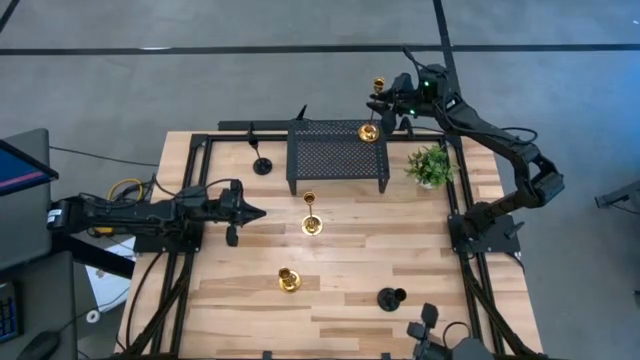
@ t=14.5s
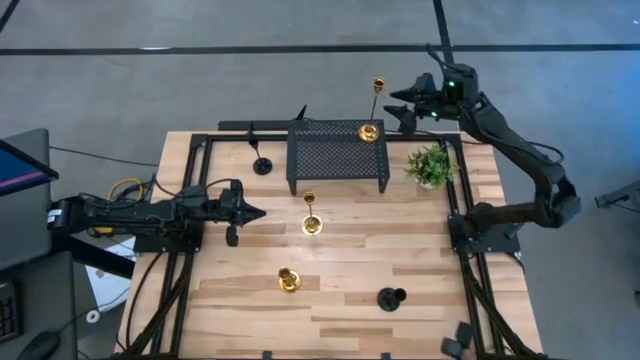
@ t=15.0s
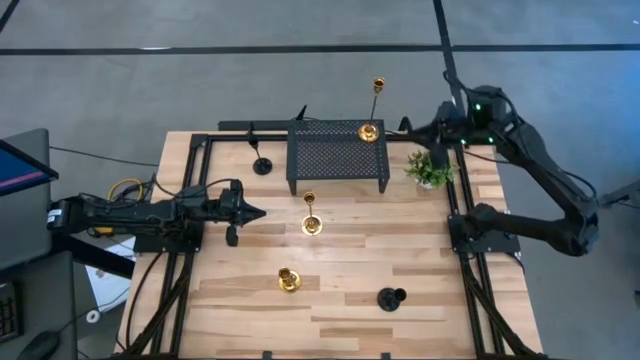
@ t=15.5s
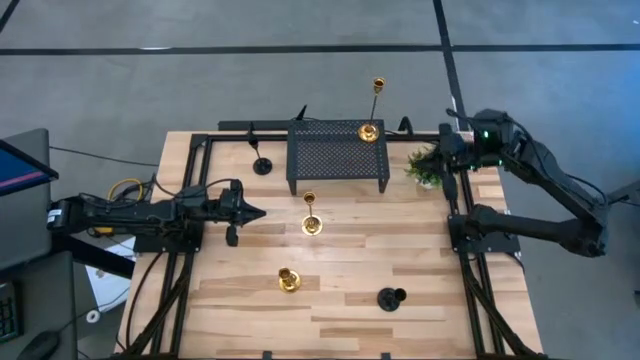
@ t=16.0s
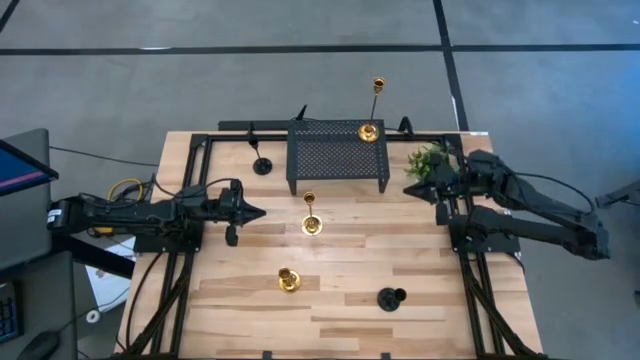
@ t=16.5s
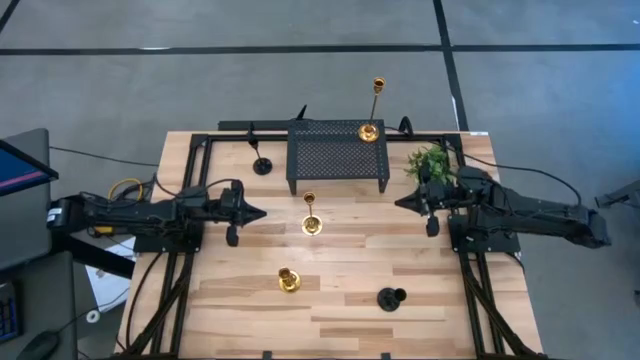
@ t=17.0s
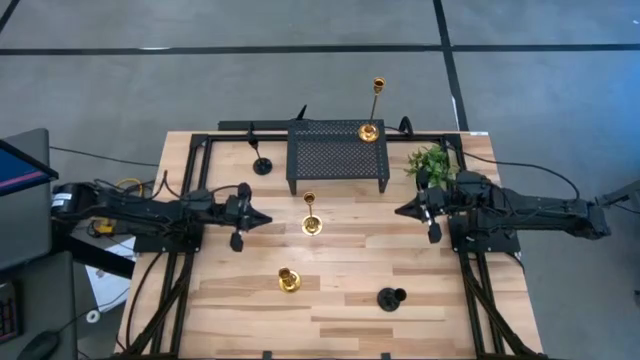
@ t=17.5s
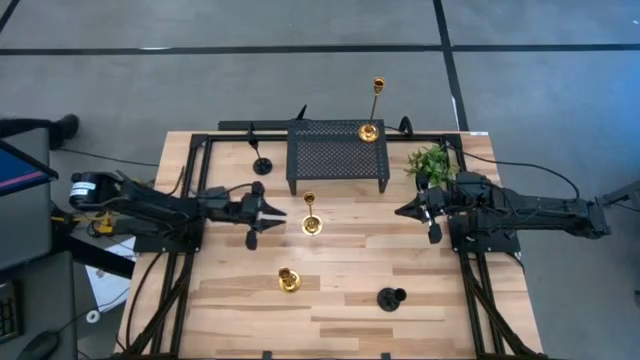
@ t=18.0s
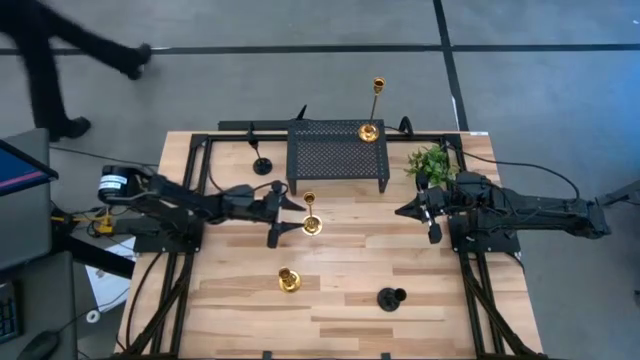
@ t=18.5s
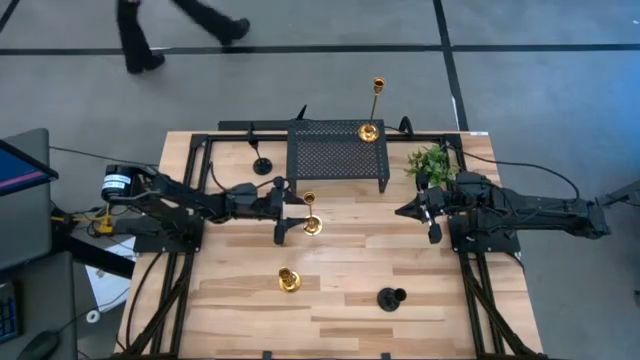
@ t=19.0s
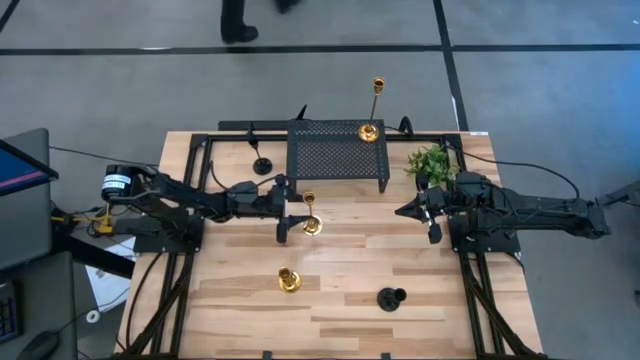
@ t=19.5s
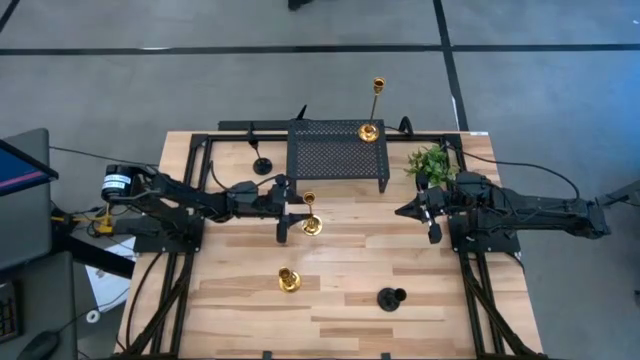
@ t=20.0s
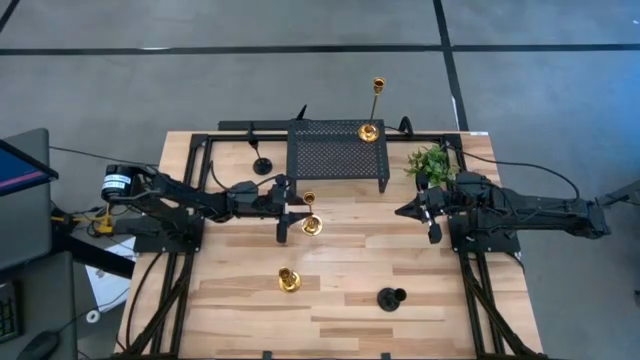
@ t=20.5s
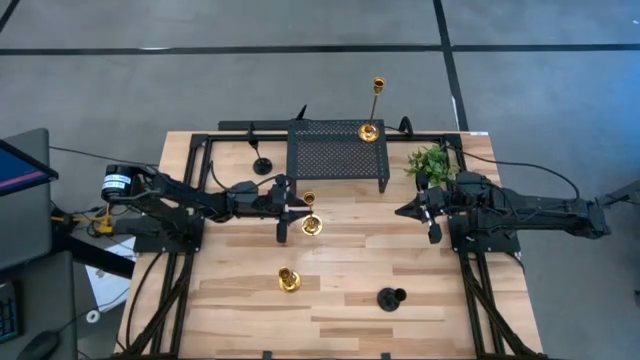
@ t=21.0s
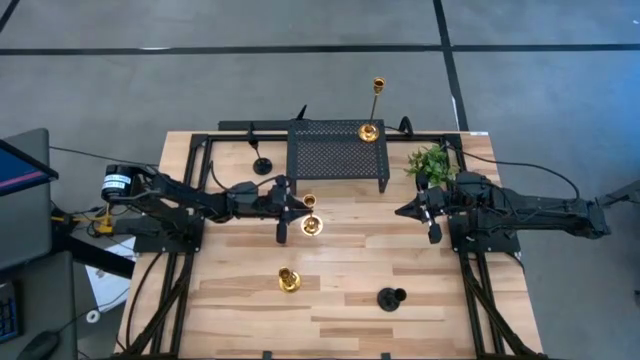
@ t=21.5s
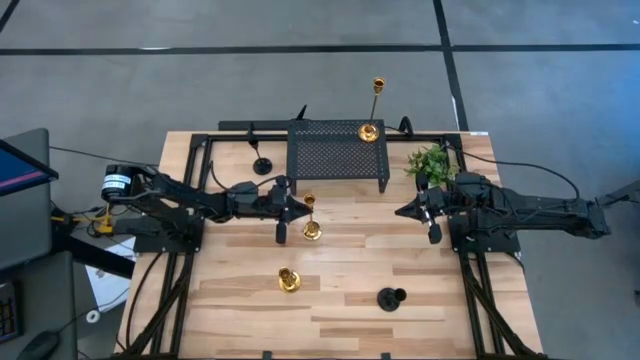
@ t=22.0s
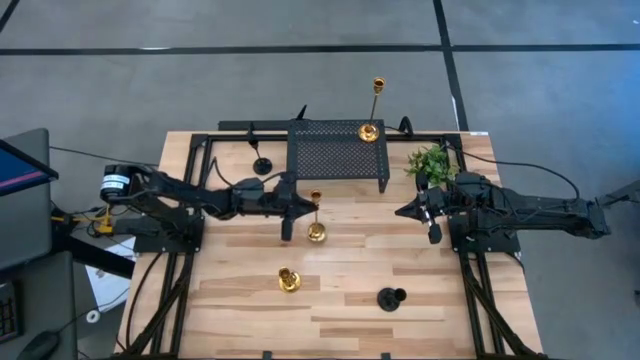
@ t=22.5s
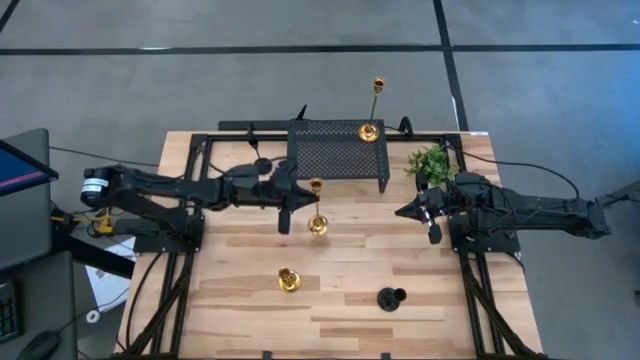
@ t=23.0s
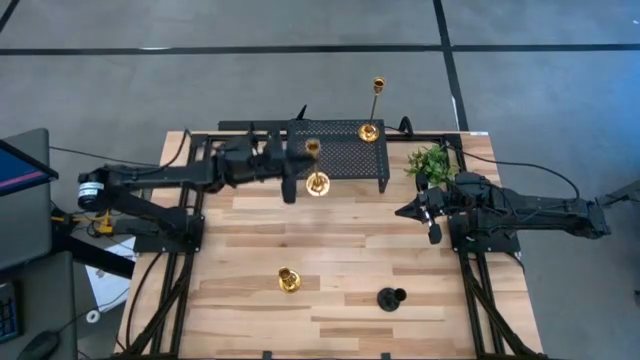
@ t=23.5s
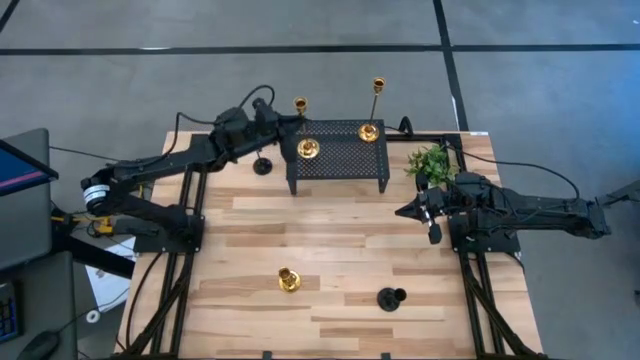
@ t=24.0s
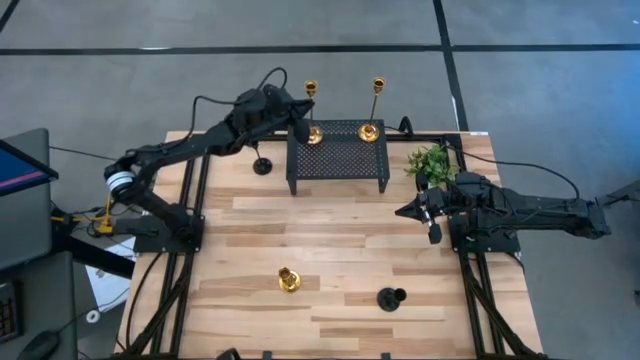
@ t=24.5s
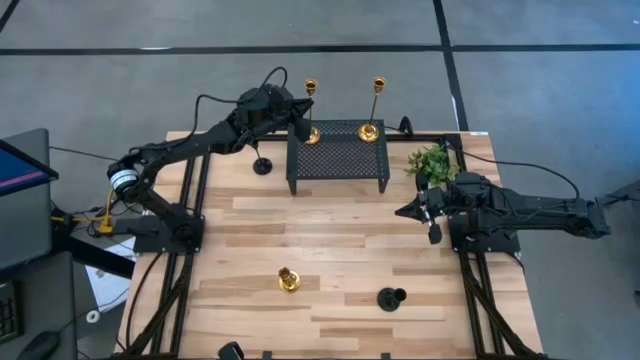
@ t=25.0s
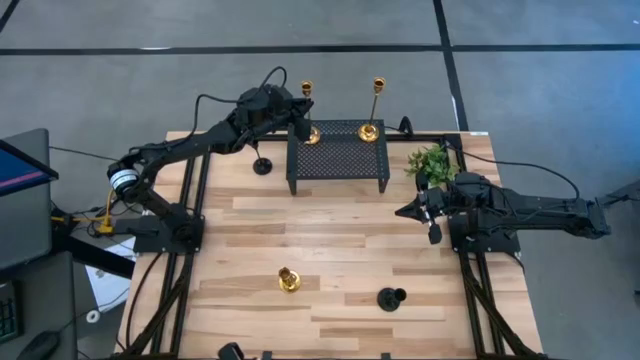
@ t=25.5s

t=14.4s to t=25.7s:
Task: Pick & Place candle stick holders
Put the top gold candle holder on the shelf

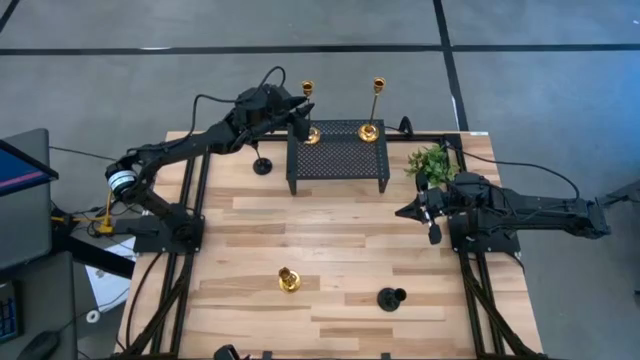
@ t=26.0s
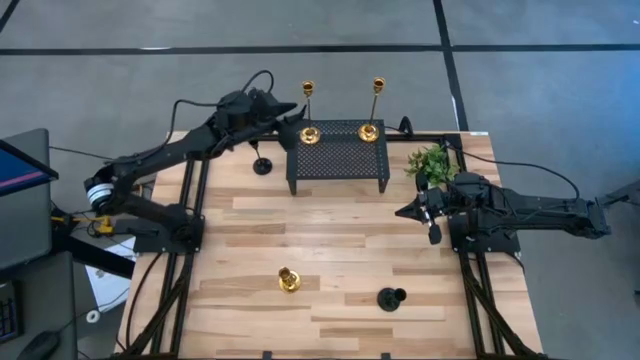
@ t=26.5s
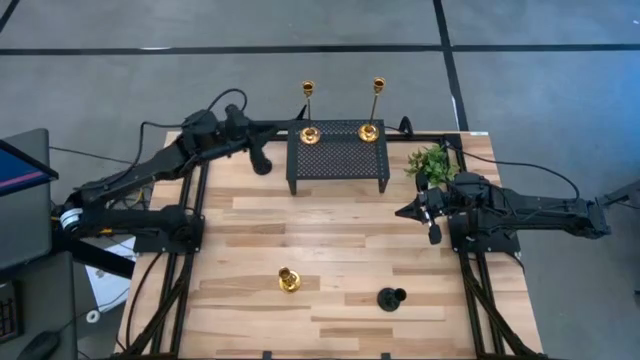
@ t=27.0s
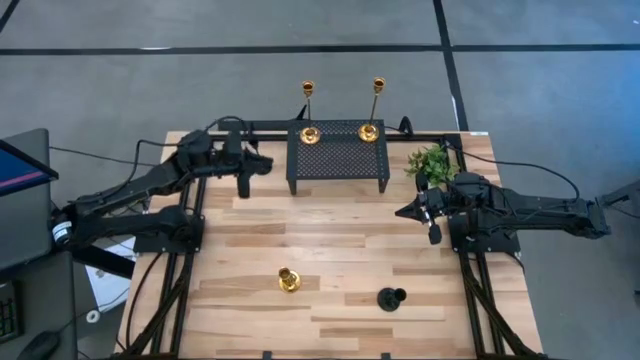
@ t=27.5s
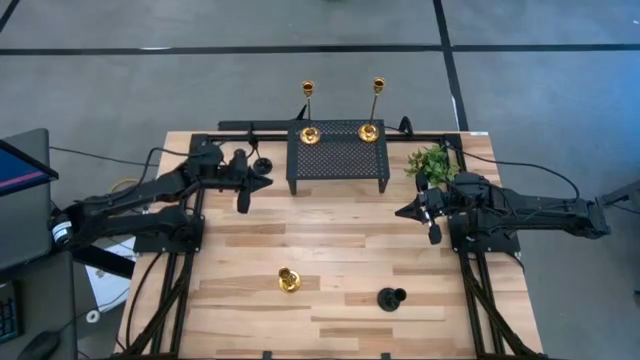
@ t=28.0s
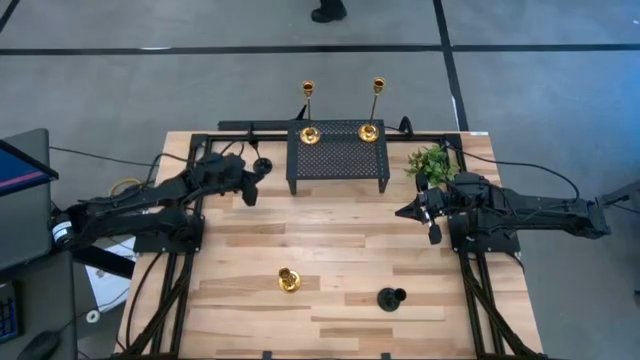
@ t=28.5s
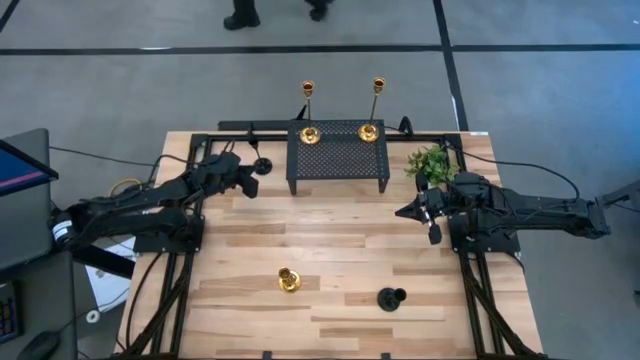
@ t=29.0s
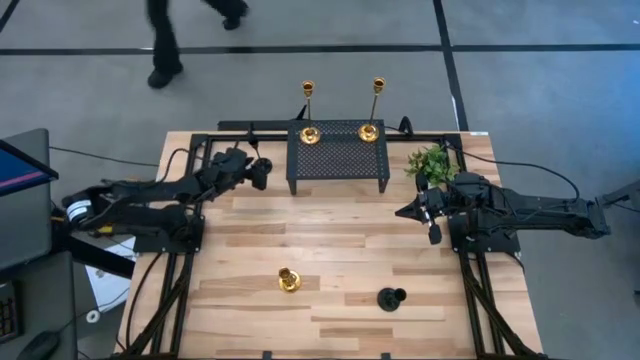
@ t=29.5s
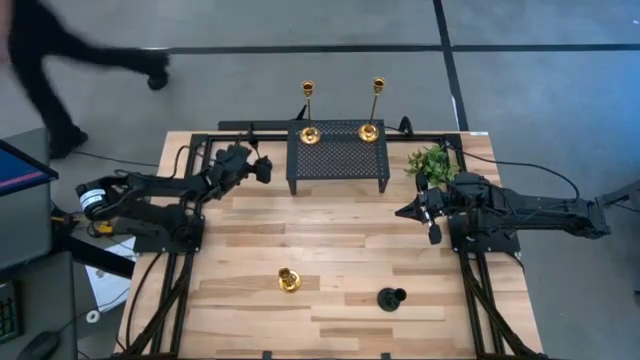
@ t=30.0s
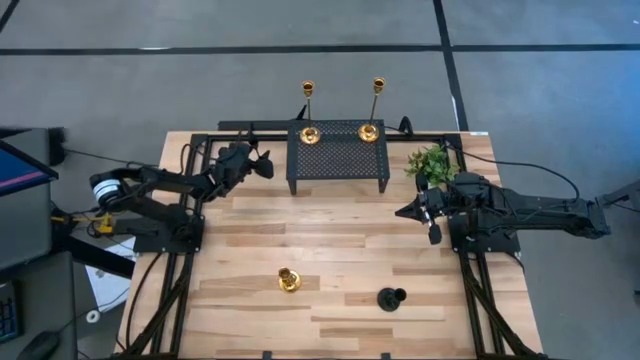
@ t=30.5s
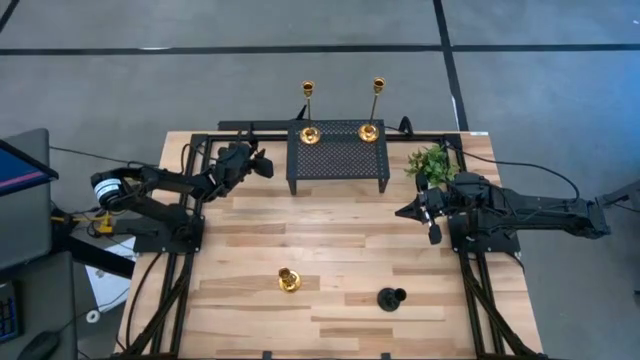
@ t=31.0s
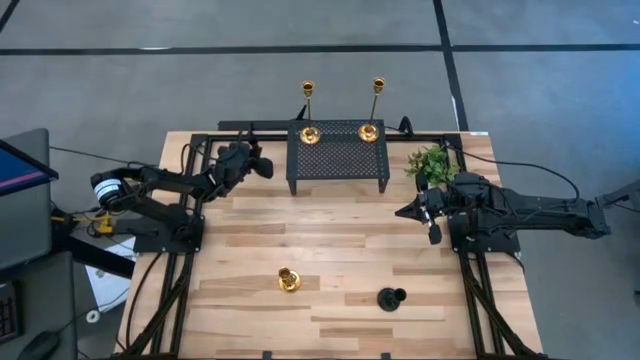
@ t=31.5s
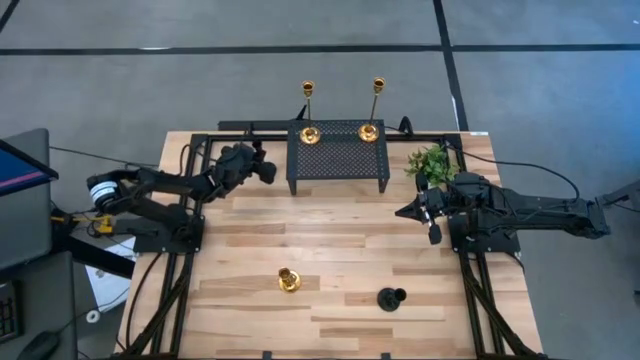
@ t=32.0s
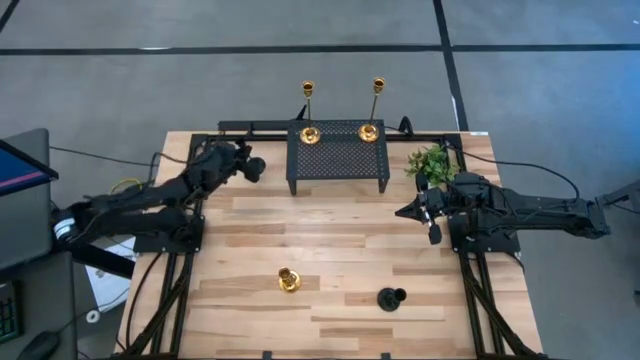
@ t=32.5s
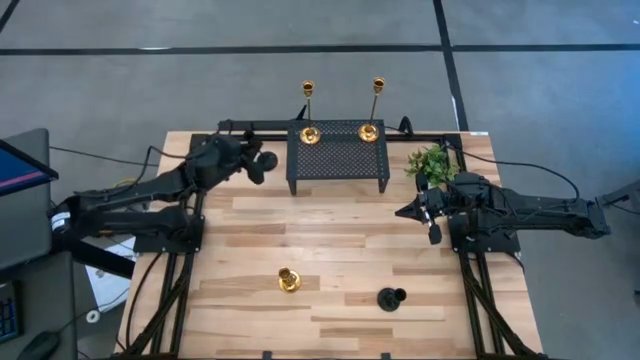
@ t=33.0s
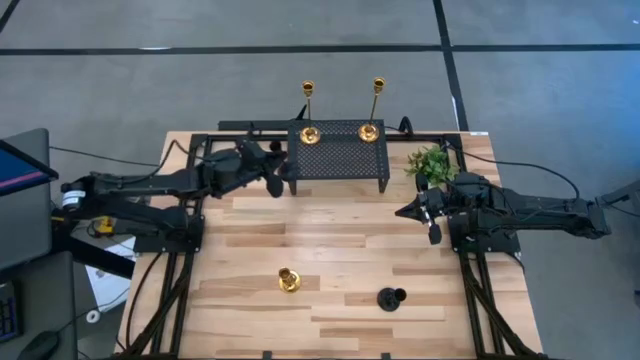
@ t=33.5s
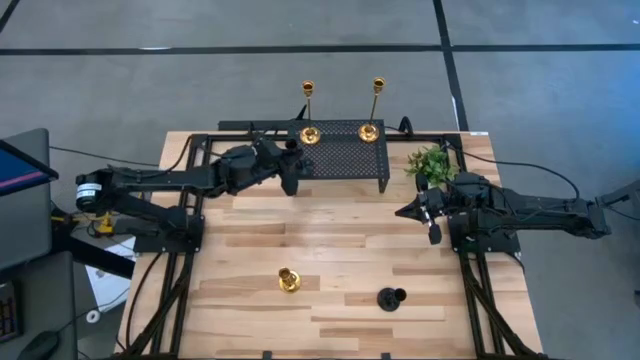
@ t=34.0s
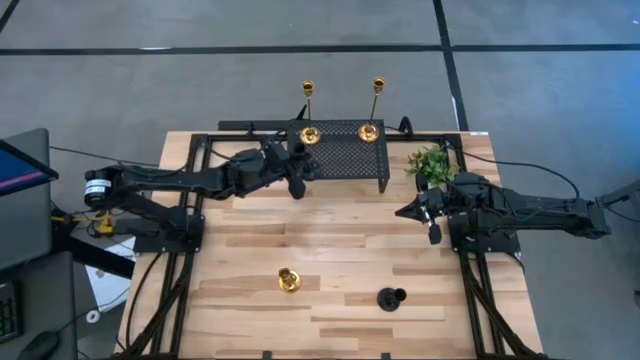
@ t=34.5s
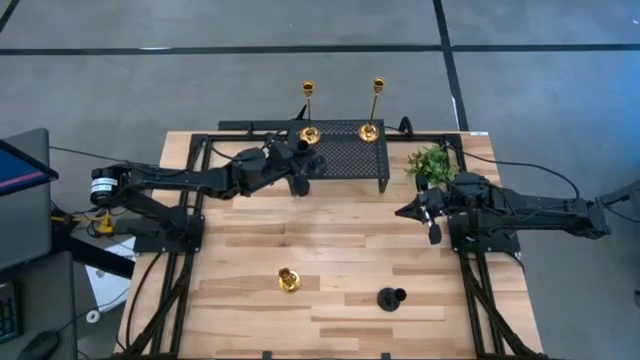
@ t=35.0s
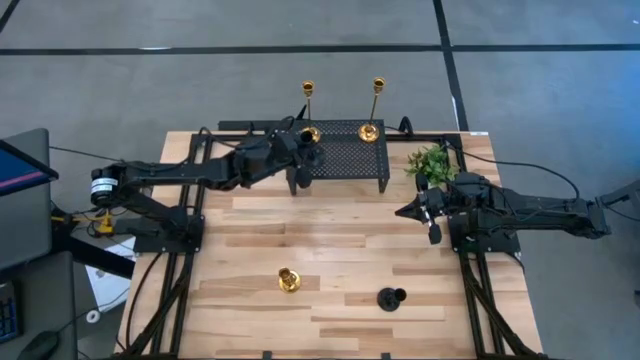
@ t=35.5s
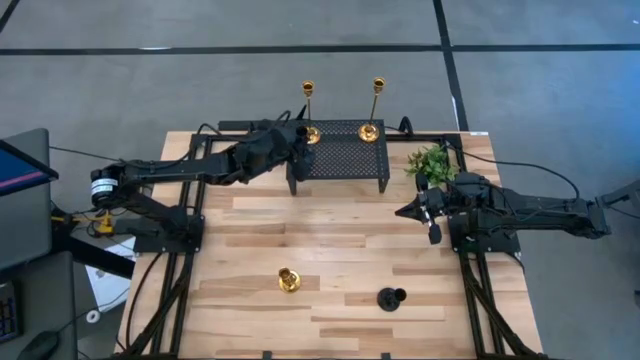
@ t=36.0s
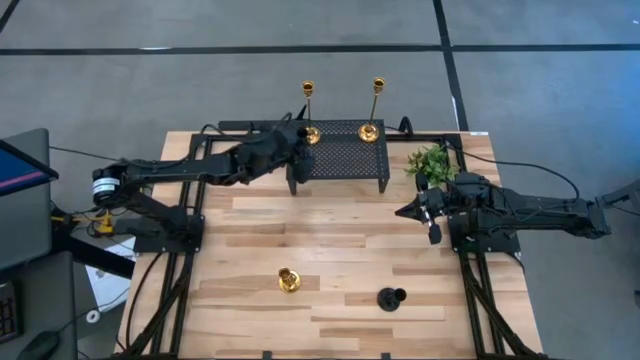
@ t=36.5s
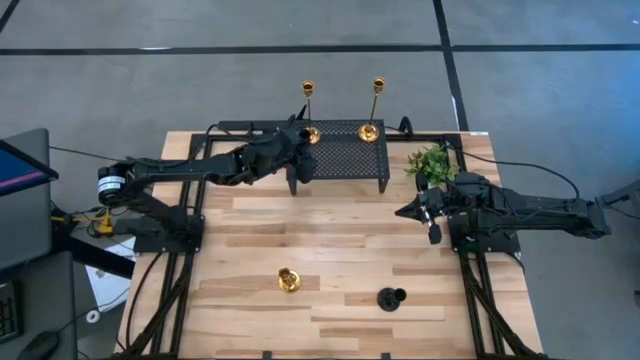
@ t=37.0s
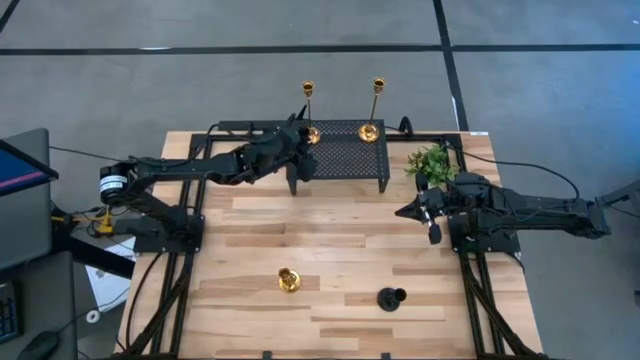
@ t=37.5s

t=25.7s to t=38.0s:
Put the top black candle holder on the shelf
